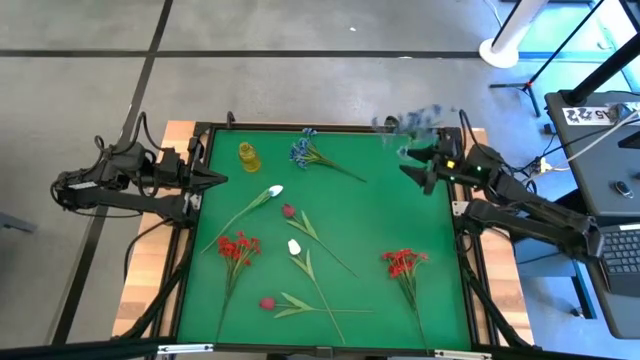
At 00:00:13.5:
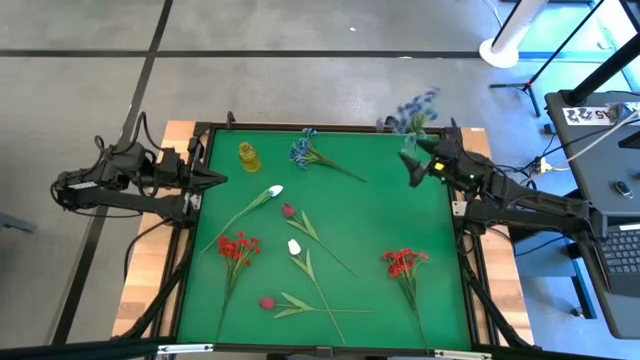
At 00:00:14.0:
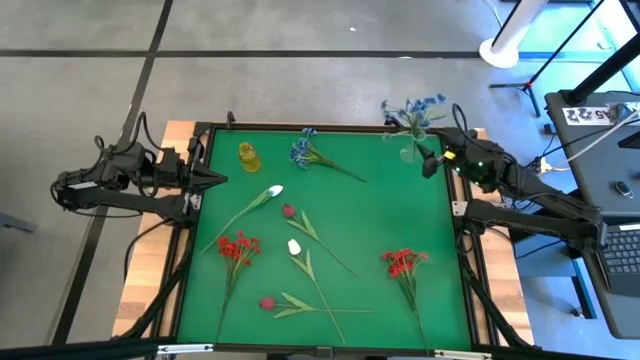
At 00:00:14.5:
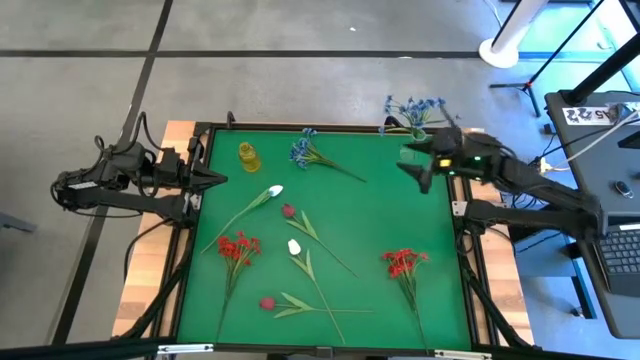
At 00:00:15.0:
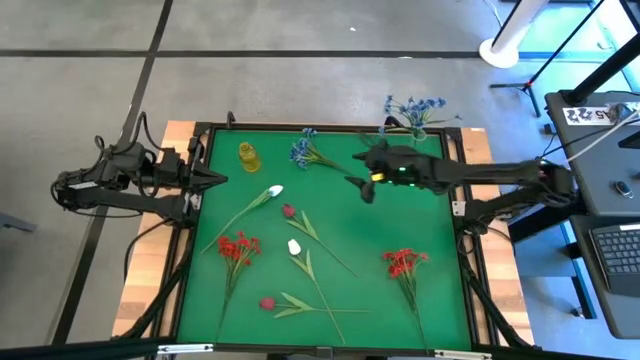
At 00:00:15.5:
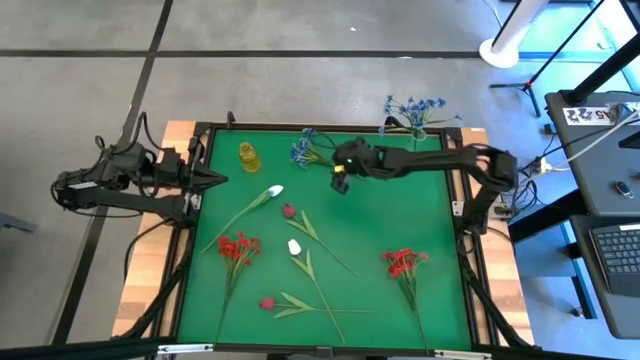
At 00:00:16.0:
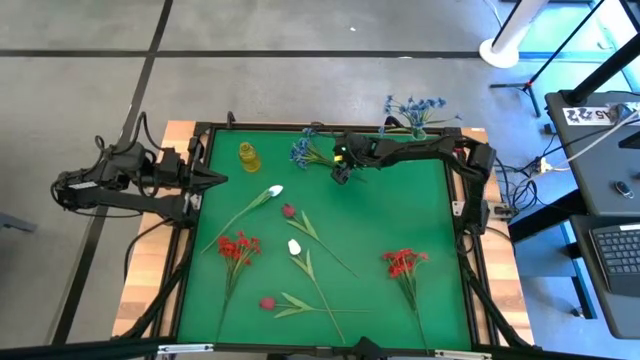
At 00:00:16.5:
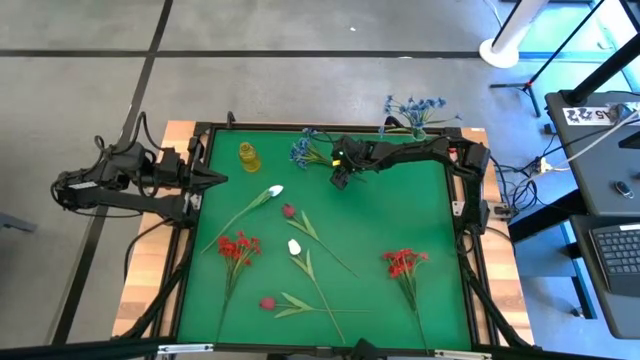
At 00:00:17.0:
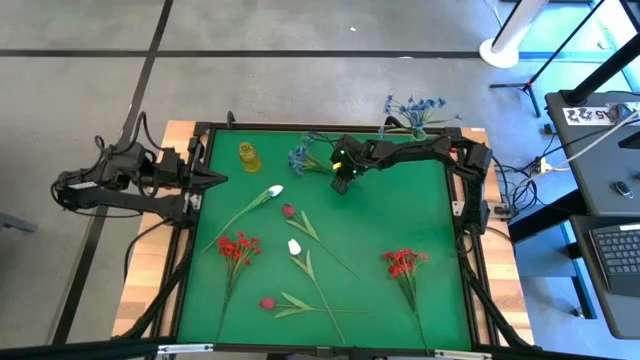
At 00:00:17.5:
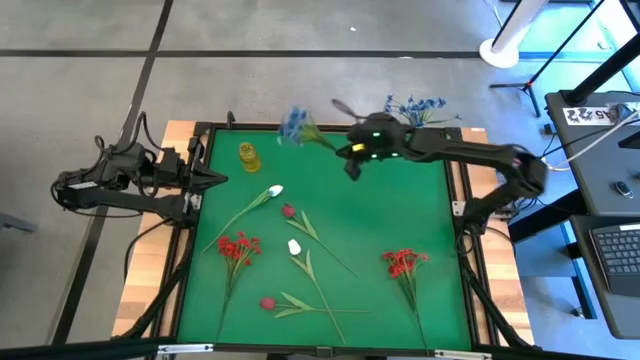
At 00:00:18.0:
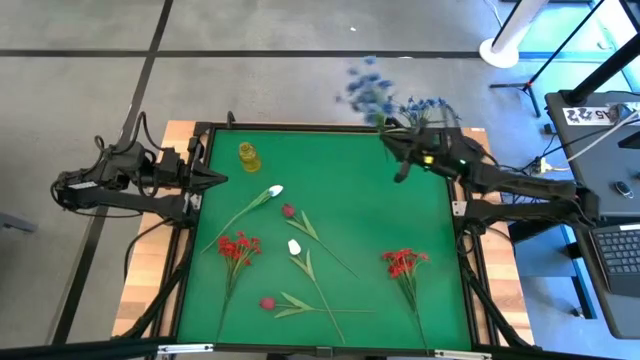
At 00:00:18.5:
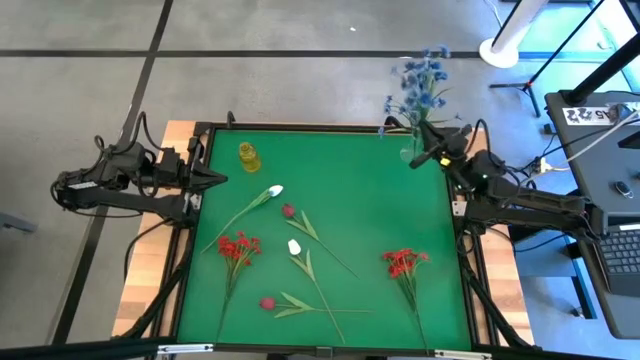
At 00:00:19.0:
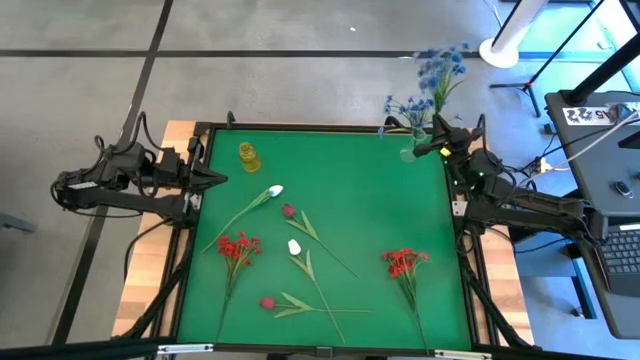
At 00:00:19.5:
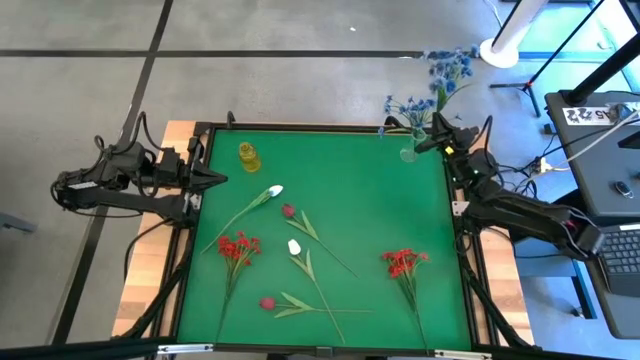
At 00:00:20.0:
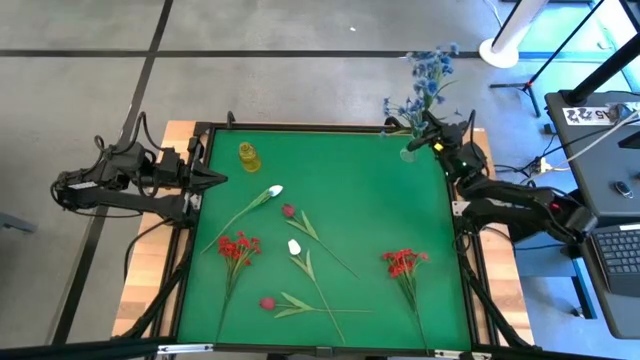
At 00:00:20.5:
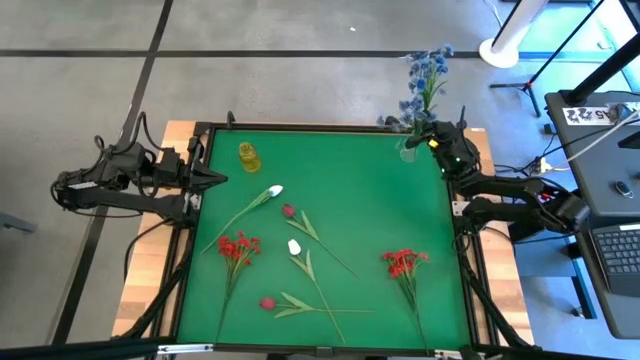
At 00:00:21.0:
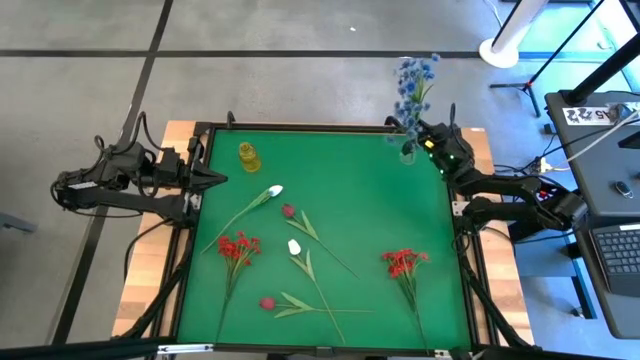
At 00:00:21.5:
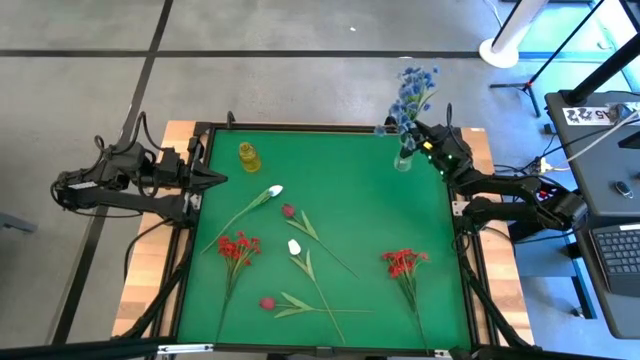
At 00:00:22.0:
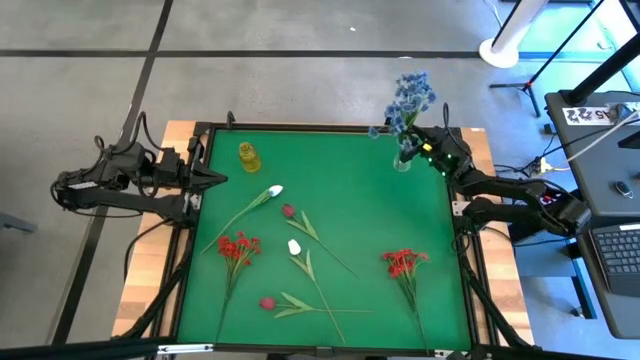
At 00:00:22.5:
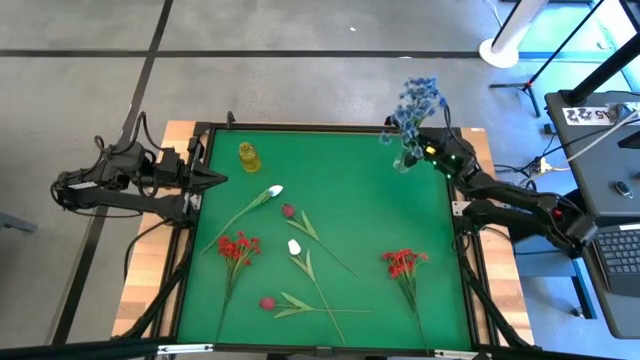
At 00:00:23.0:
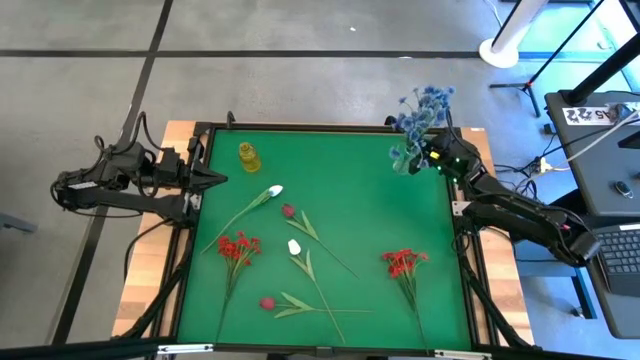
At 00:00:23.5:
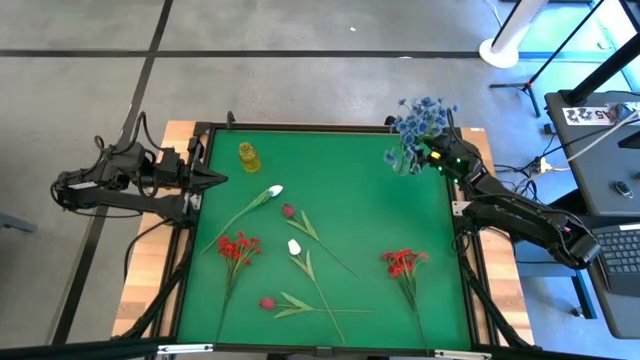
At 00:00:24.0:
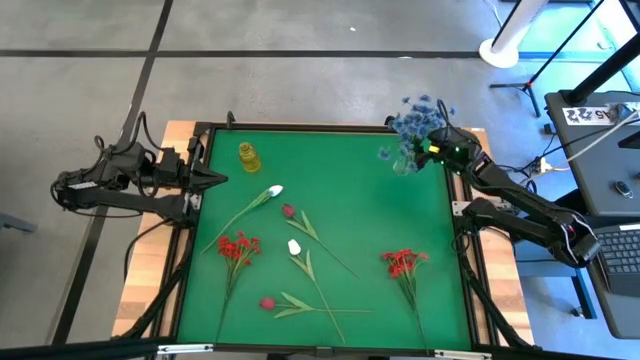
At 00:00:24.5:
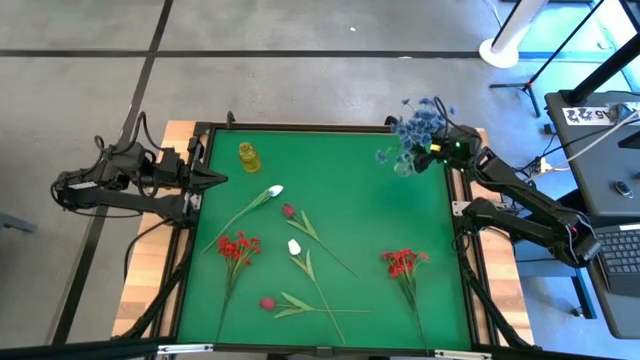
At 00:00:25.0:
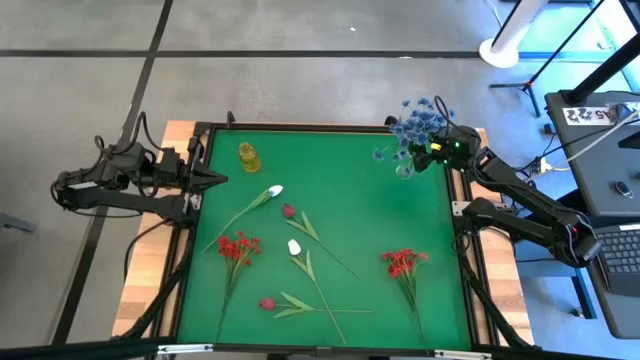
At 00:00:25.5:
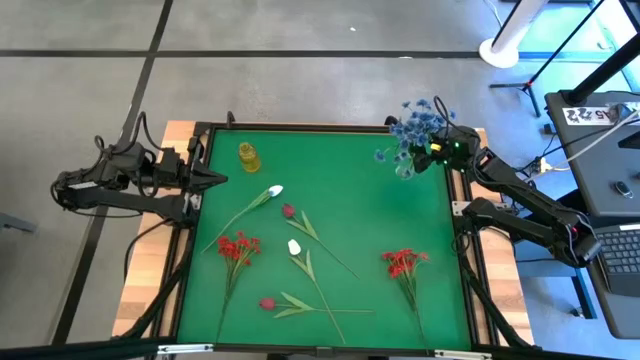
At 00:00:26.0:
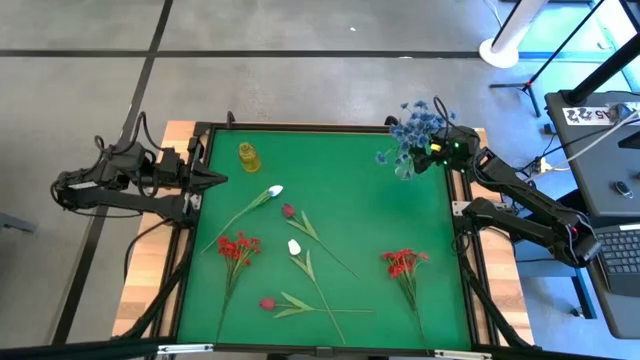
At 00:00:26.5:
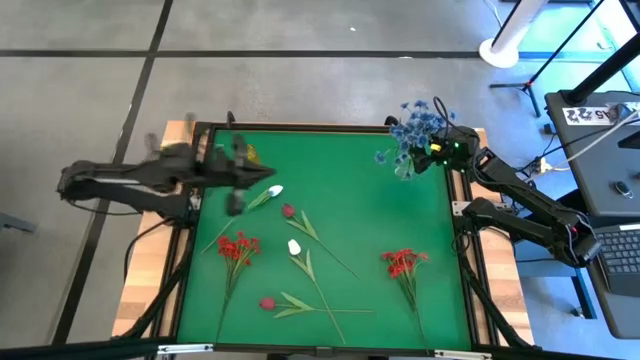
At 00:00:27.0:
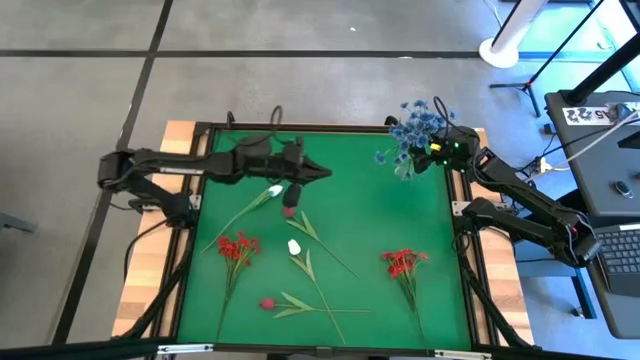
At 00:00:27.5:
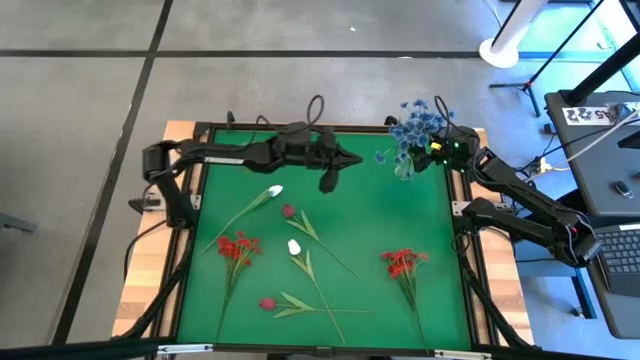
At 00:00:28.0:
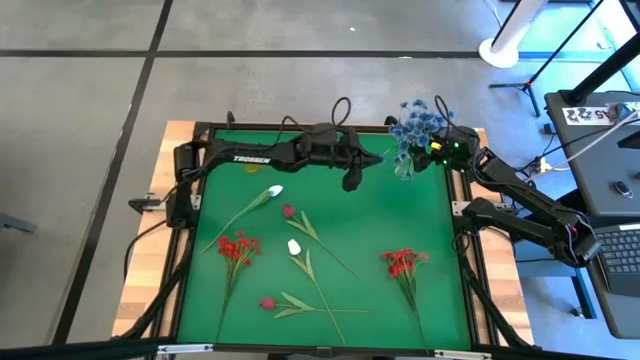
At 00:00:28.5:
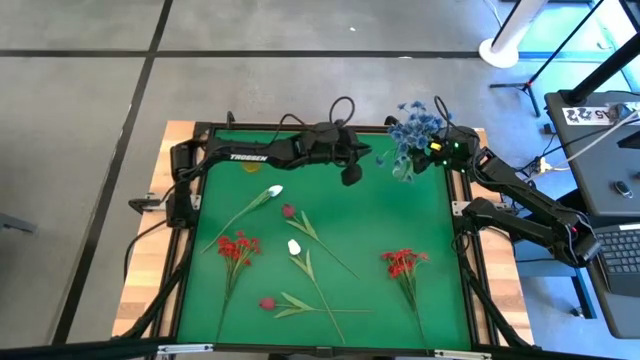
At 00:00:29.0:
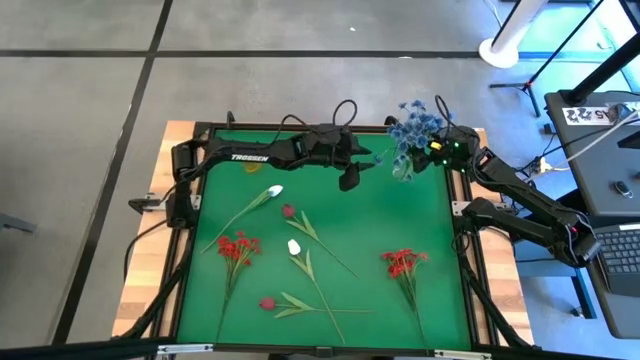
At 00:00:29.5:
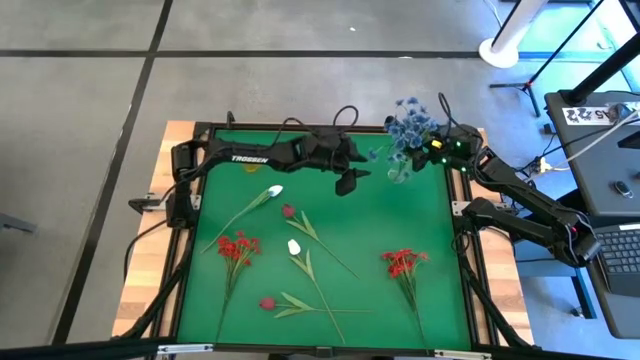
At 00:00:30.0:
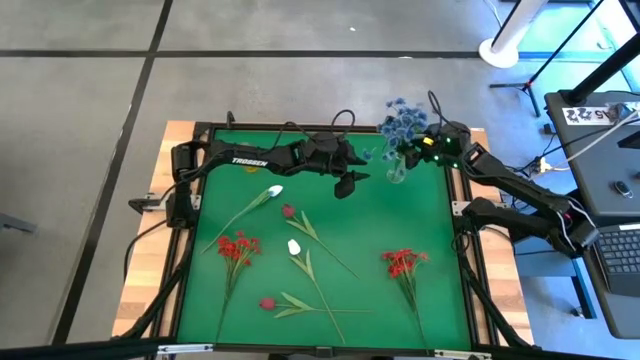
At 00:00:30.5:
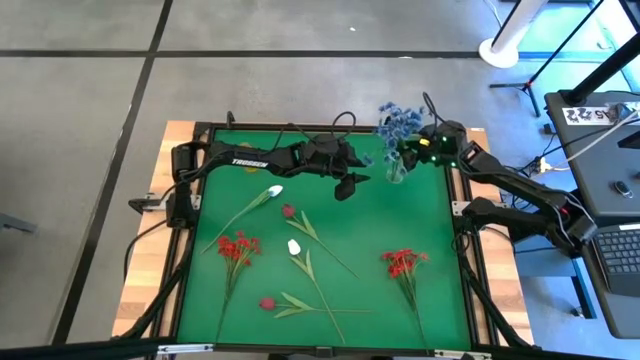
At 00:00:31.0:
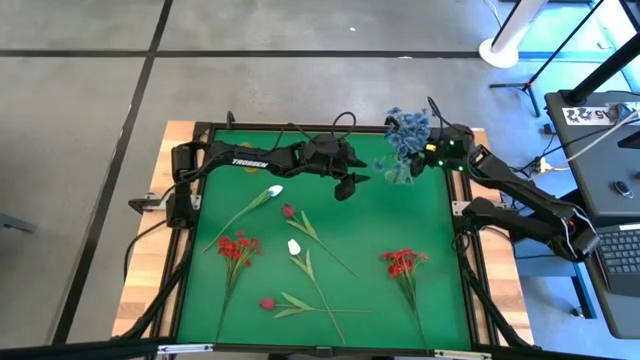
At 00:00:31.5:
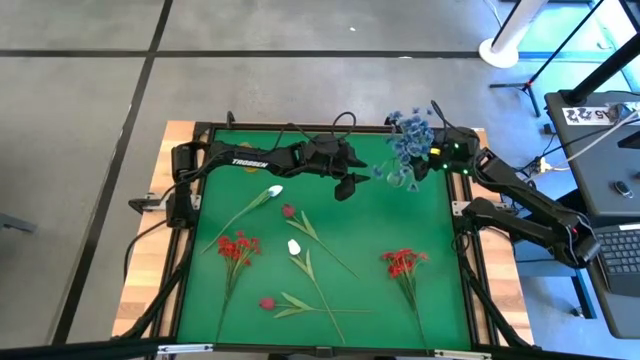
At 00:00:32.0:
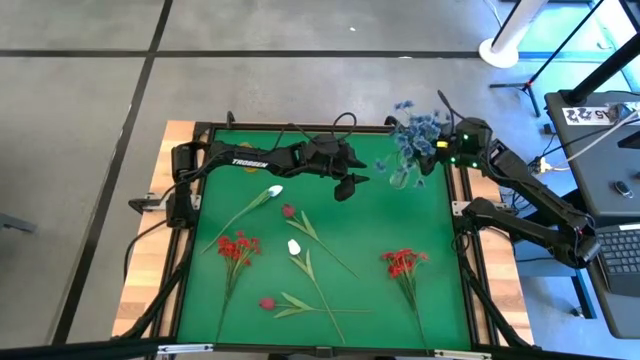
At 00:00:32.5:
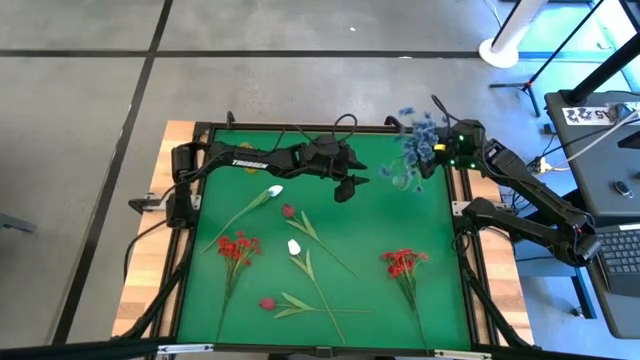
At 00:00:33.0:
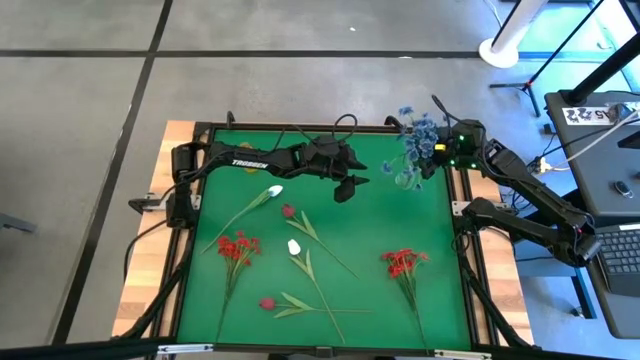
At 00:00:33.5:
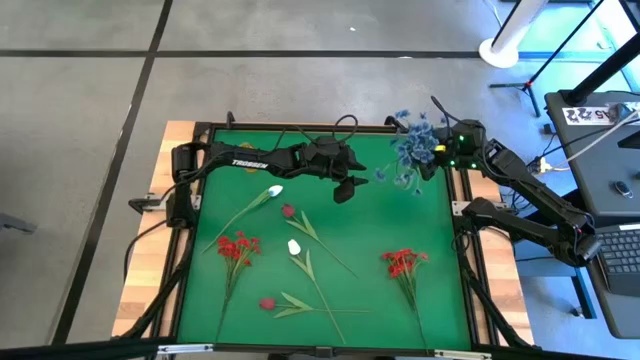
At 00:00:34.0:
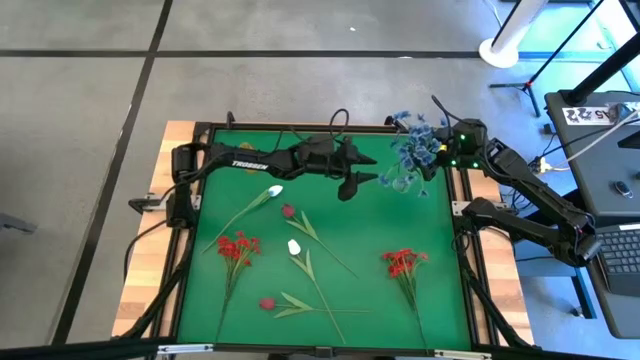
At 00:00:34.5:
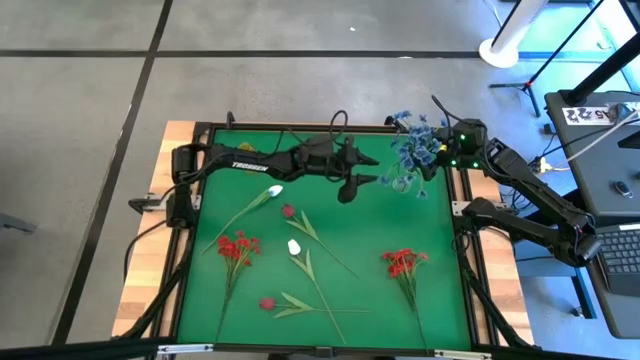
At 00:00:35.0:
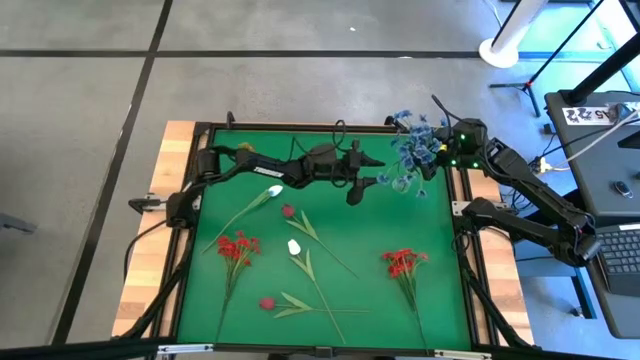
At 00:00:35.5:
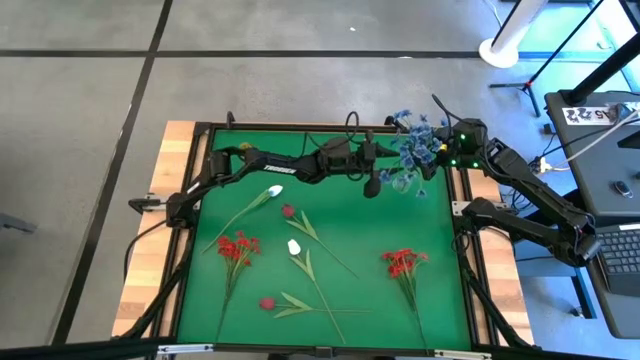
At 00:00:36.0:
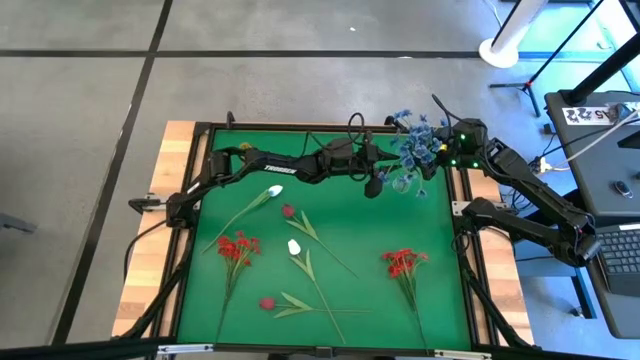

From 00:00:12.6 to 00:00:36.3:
Task: Sort flowers into vase by color
Put the light blue flowers into the transparent vase
